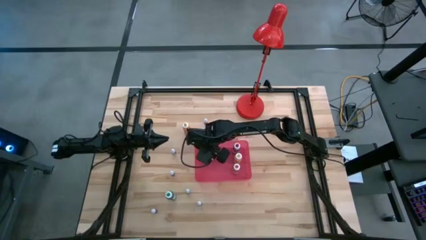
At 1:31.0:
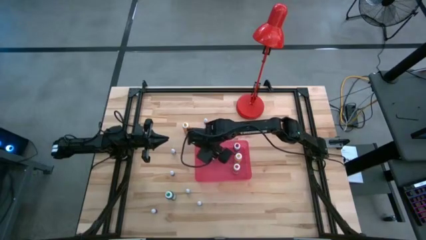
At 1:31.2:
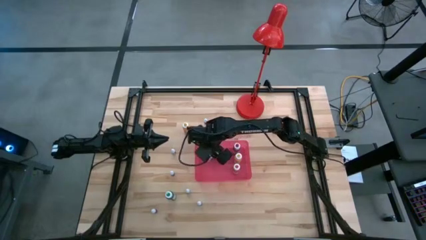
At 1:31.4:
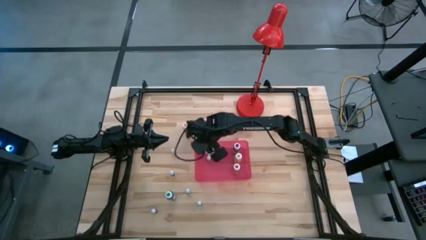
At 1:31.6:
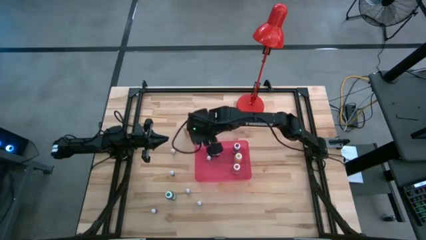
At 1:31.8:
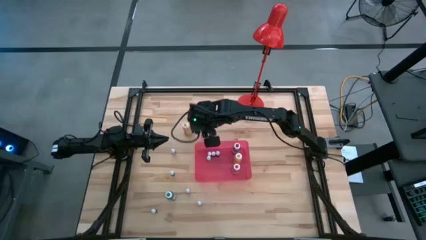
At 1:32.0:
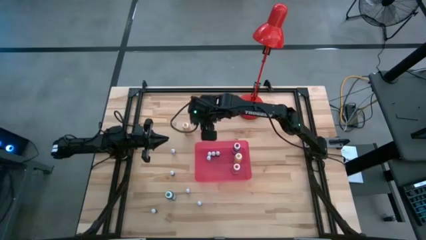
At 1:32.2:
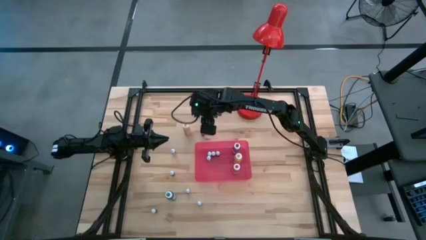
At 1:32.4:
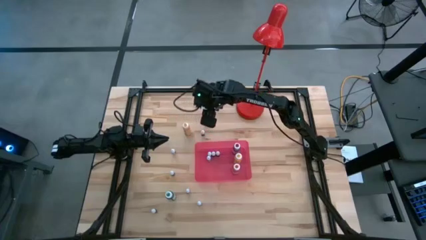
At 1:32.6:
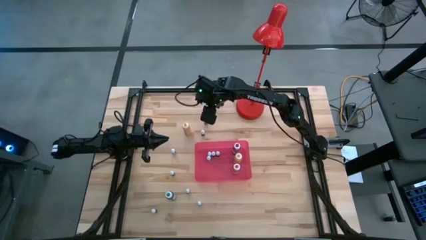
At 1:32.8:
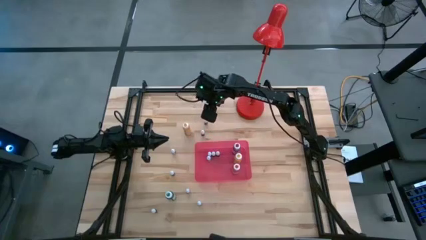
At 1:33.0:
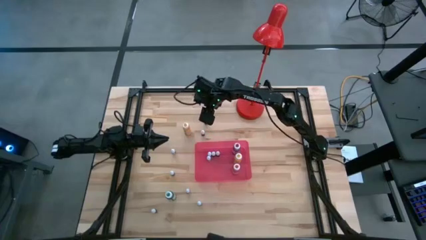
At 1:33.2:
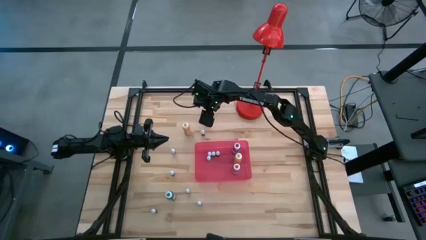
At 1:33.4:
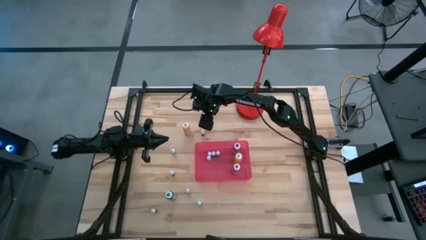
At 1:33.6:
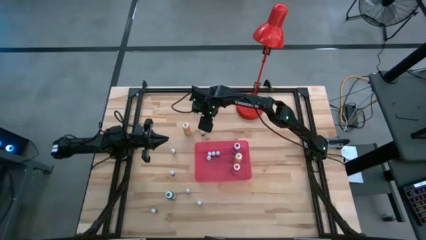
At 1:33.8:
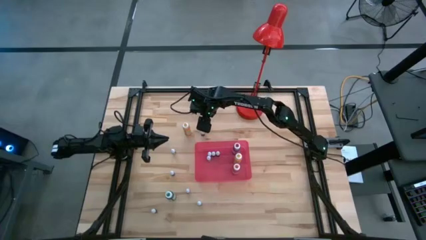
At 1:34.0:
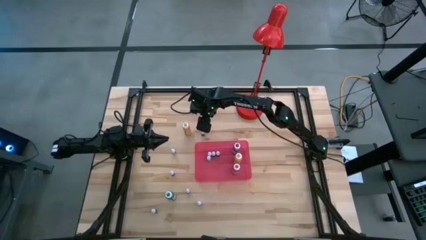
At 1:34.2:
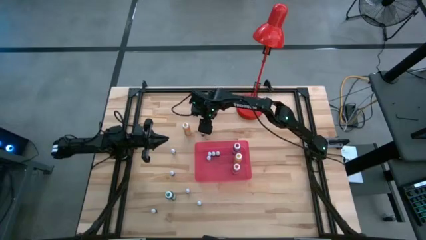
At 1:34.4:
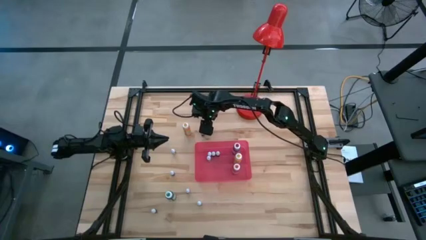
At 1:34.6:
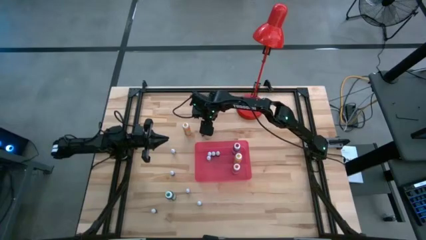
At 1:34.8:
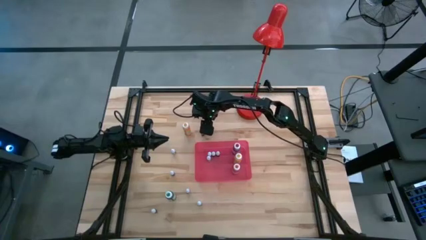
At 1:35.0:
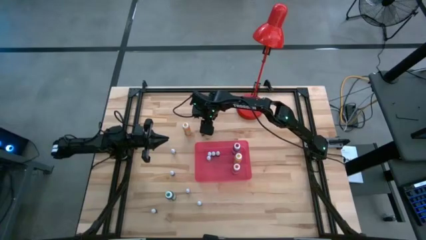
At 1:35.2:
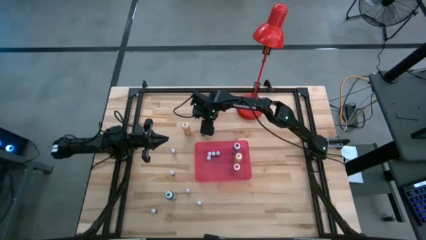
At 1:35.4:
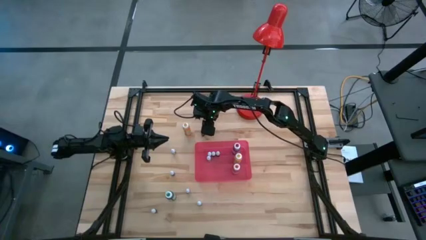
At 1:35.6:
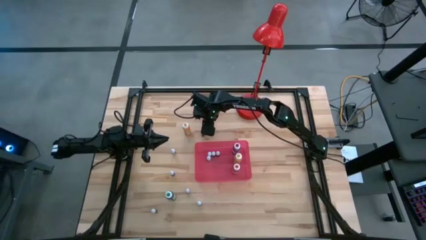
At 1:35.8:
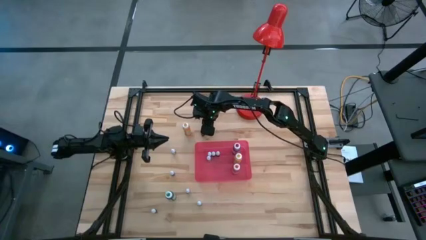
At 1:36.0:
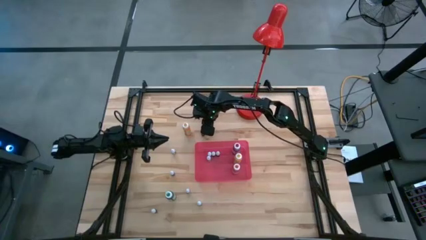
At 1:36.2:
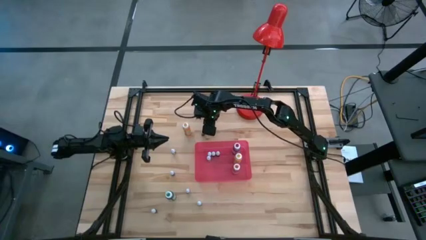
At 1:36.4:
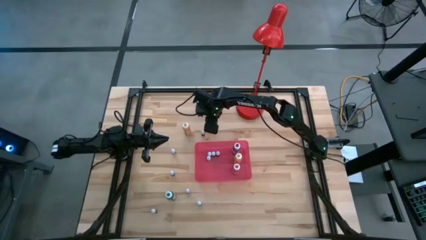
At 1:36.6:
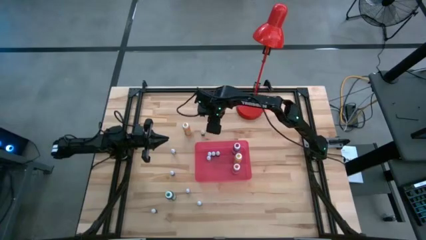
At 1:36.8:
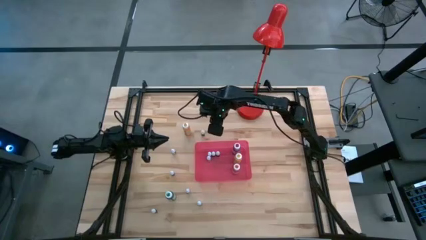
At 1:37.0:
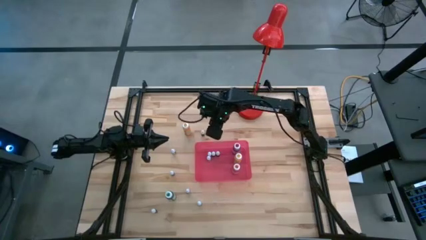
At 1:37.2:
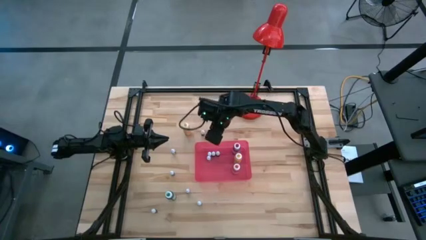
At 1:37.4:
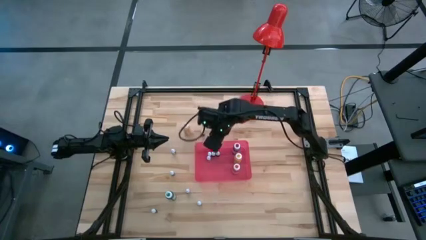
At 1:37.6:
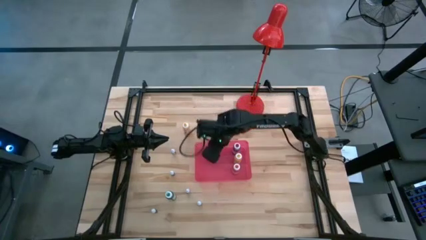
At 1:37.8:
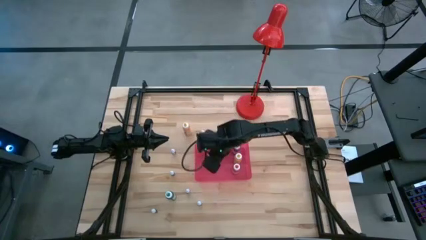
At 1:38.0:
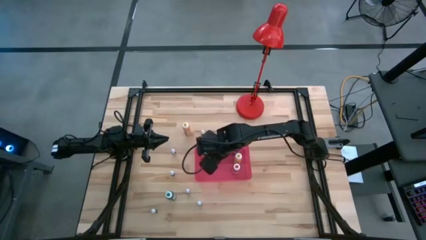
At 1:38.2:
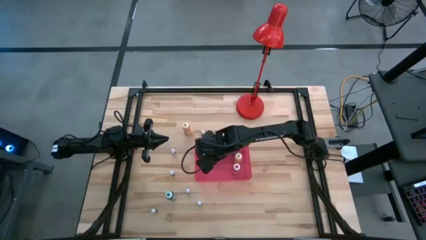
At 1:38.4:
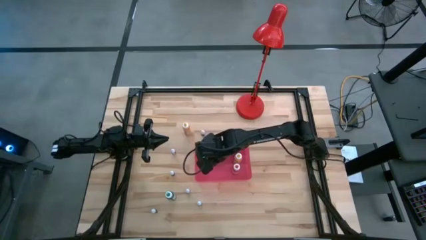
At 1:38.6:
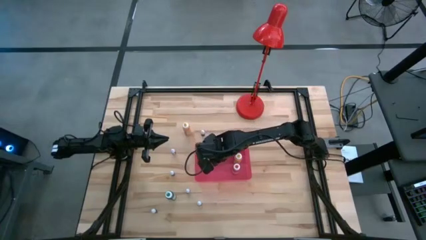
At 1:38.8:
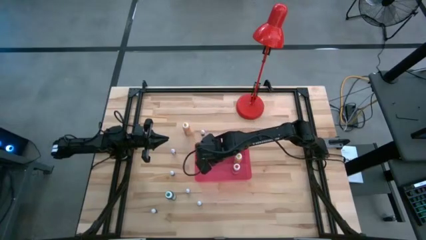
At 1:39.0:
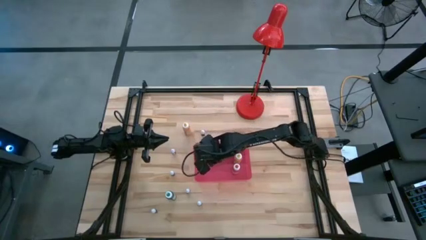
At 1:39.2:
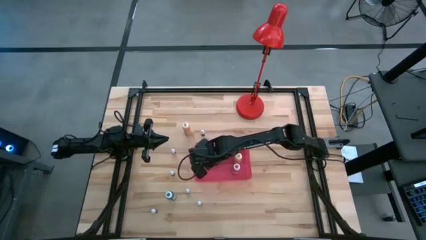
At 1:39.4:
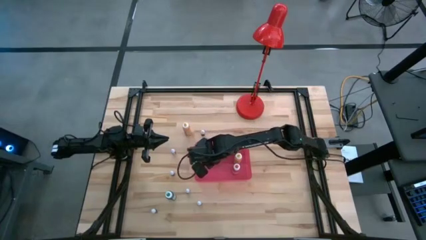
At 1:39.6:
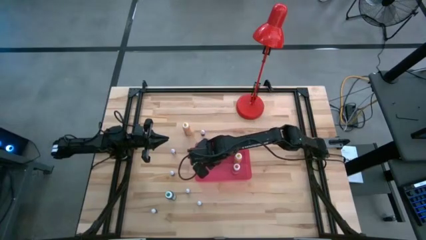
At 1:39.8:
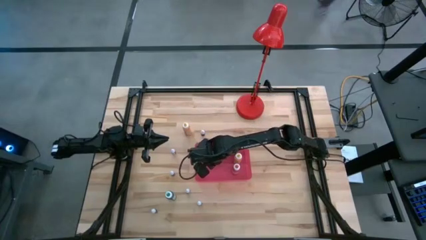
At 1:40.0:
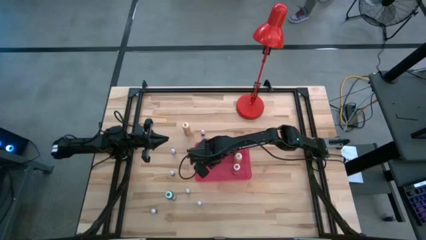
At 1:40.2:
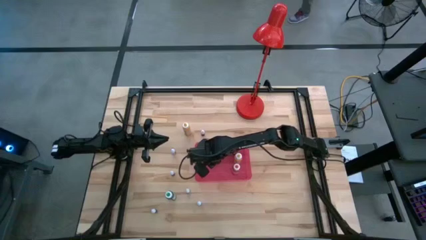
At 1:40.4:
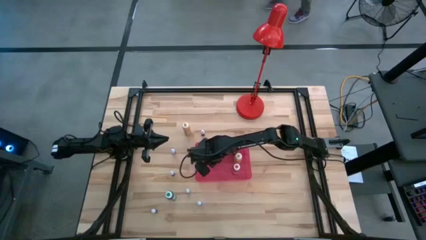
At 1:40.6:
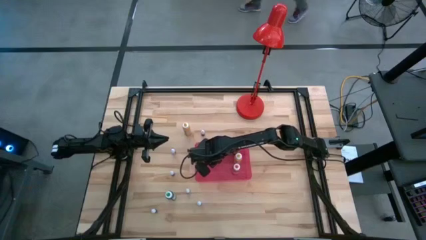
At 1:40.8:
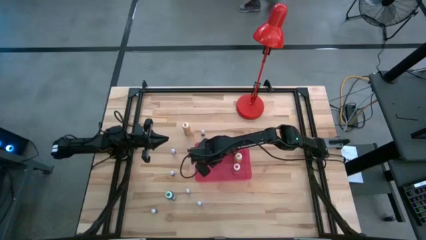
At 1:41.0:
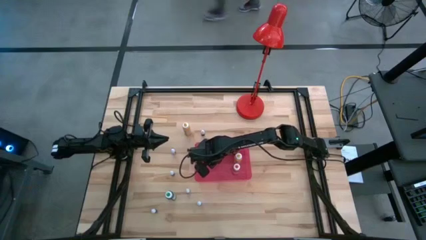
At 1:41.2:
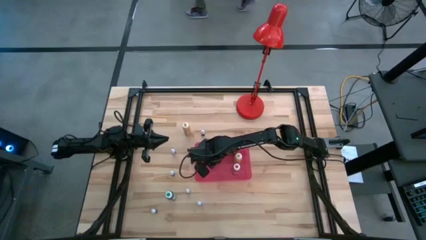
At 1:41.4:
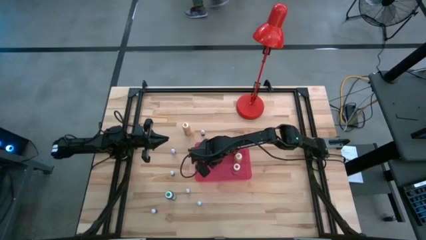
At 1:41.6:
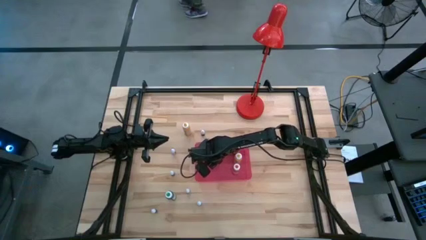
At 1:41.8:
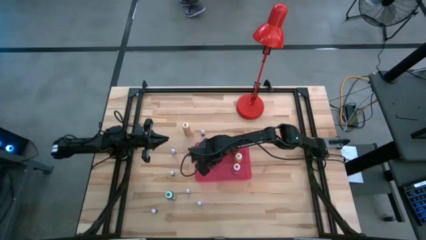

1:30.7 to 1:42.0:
Task: Pick & Place food coloring
Put the small violet food coloring bottle into the red bin

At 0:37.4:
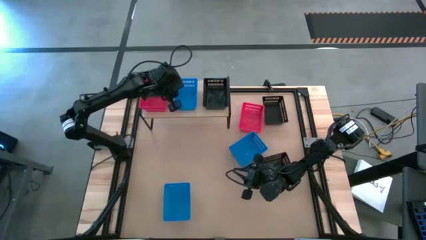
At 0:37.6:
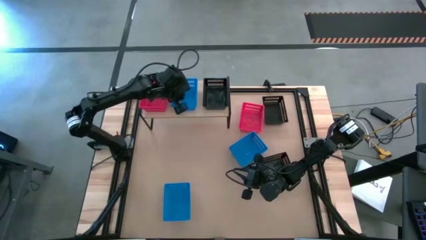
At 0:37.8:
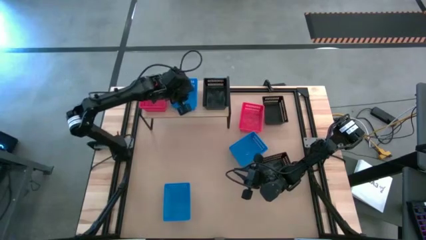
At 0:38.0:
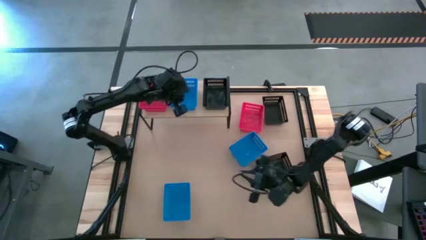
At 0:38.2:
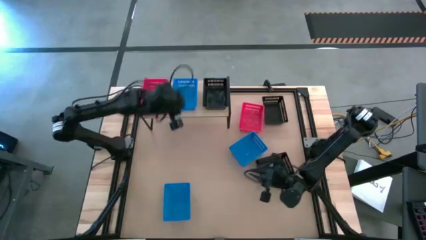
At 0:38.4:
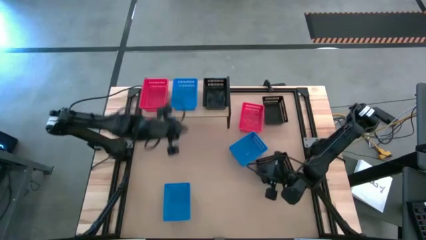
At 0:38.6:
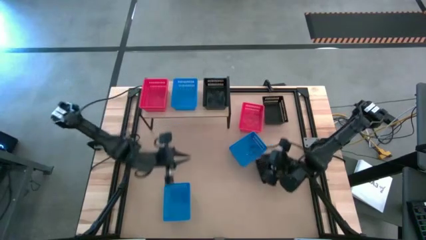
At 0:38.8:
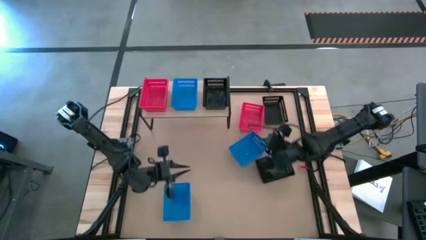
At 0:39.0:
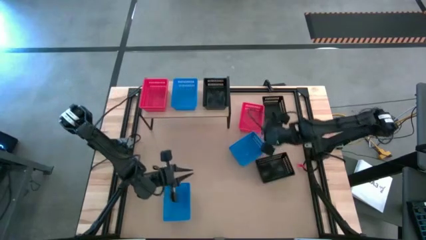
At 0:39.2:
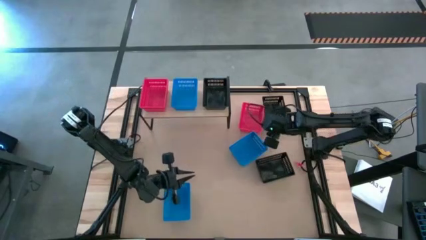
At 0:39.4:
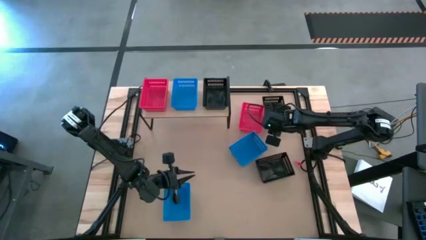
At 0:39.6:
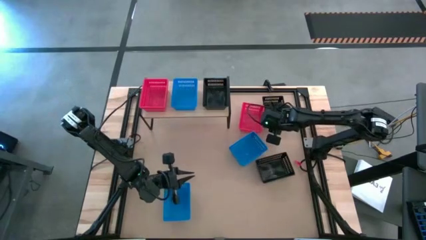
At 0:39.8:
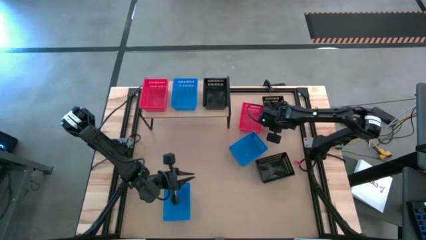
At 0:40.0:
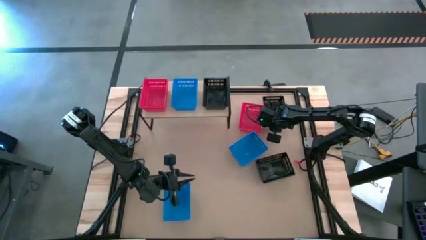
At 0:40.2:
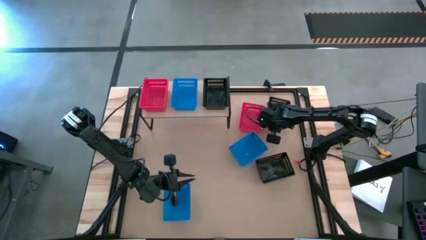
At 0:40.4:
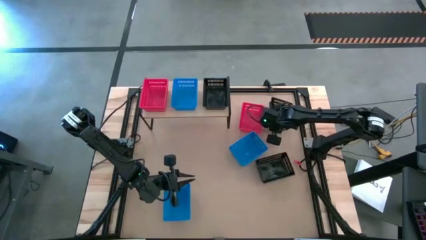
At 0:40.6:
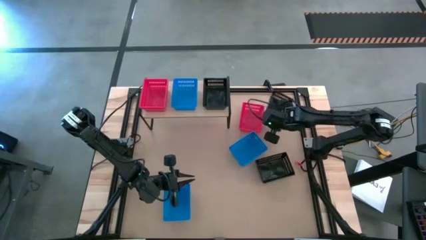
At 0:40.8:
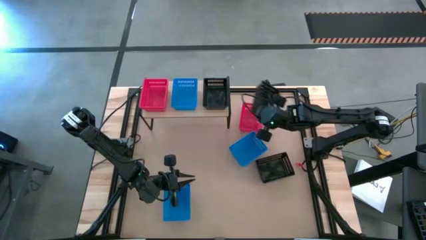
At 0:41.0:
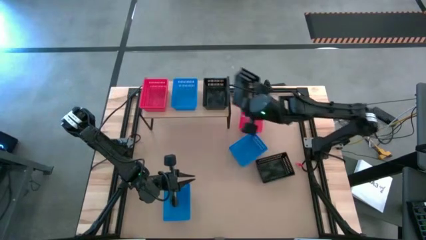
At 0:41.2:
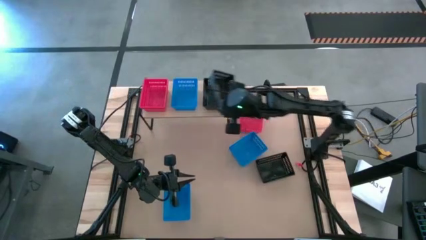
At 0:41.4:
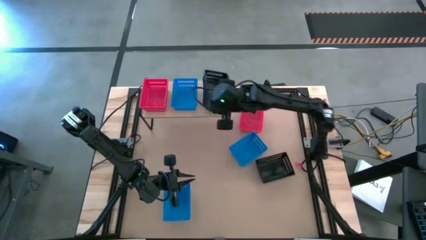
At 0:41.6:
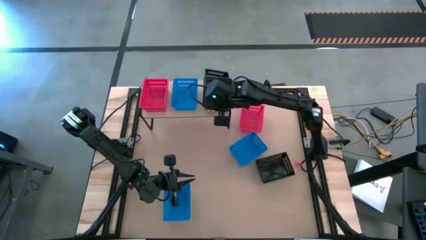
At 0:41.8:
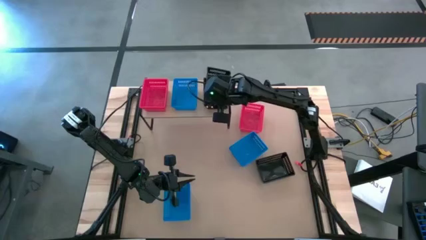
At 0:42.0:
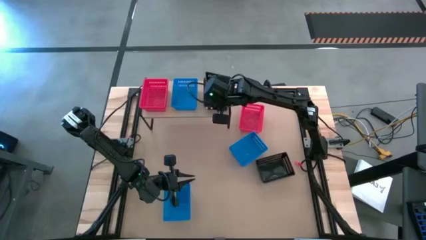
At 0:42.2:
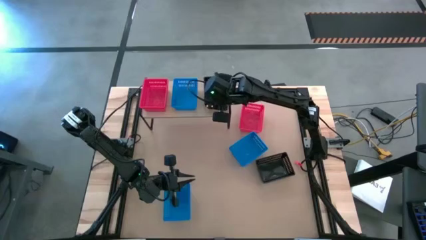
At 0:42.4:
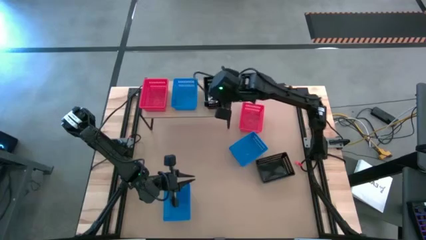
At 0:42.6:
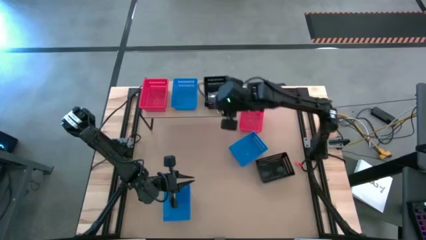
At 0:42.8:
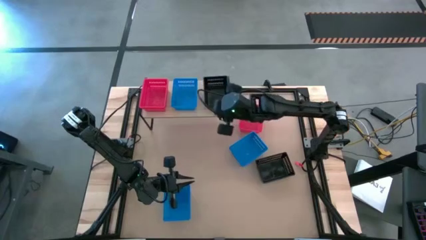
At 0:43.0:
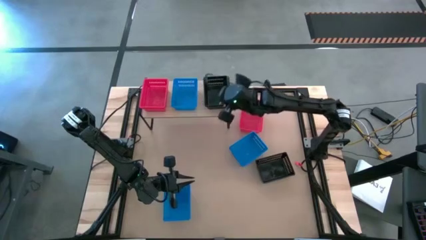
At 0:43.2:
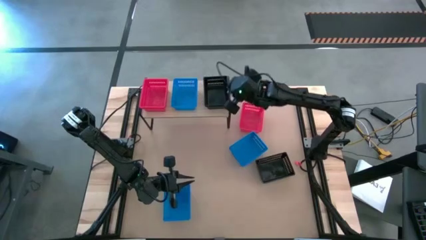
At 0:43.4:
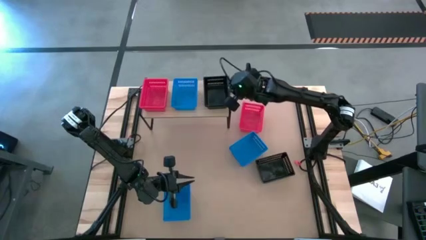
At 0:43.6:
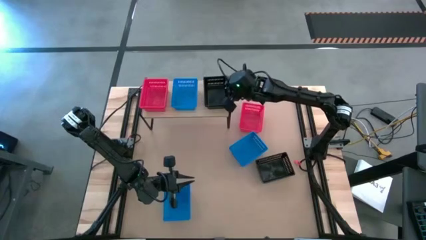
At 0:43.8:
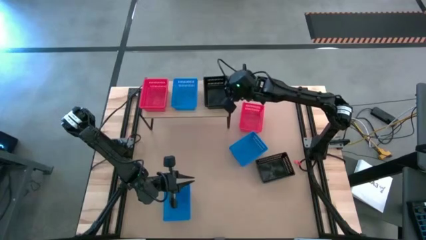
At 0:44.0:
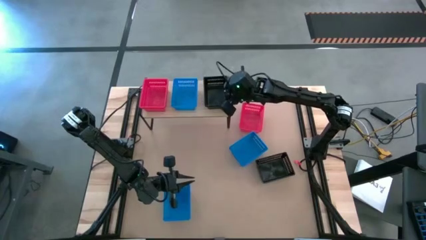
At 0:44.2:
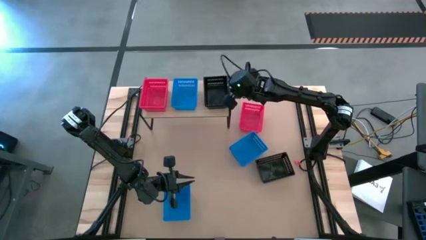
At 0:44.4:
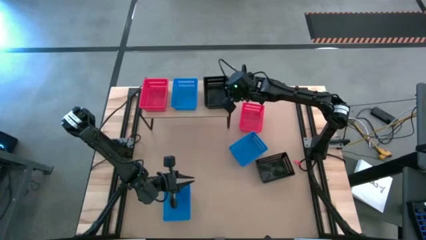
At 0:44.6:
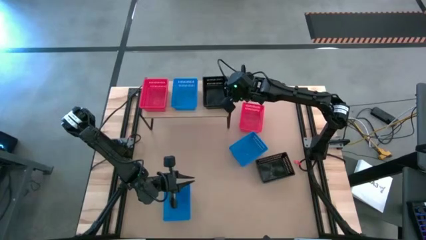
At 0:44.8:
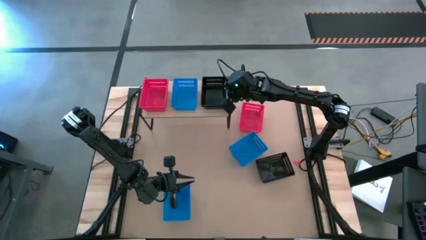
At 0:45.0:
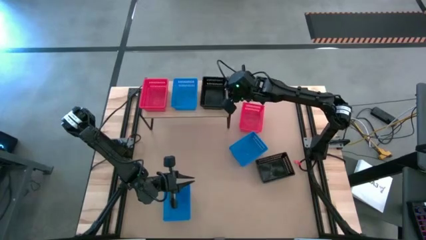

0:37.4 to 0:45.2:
Task: Stack baskets on shelf by color
Stack the top right black bin on top of the black bin on the shelf
